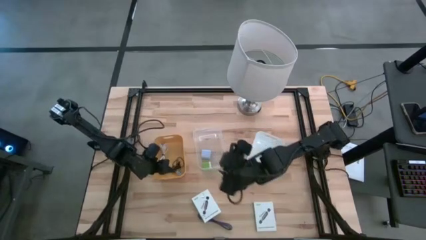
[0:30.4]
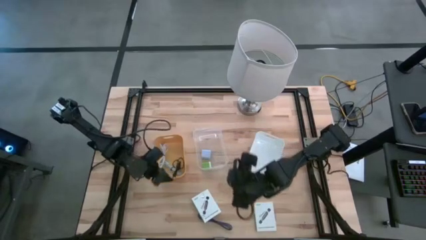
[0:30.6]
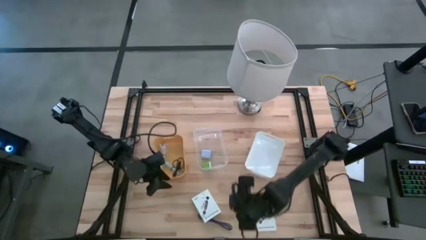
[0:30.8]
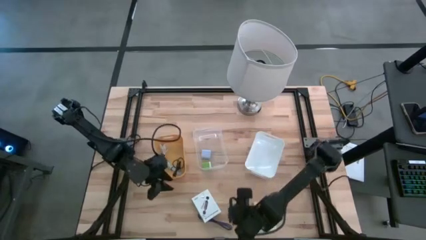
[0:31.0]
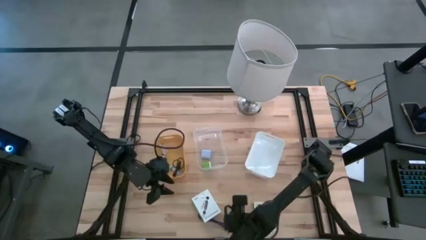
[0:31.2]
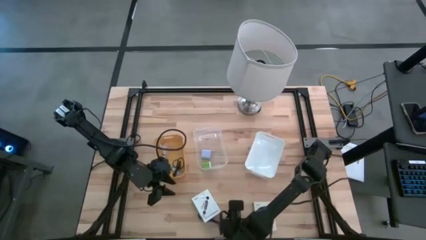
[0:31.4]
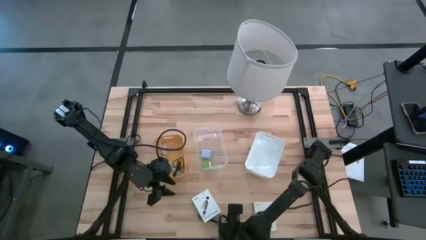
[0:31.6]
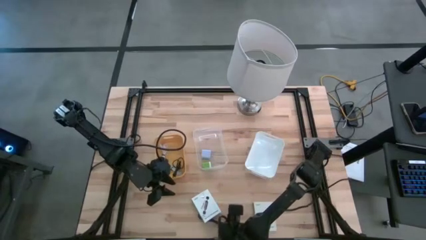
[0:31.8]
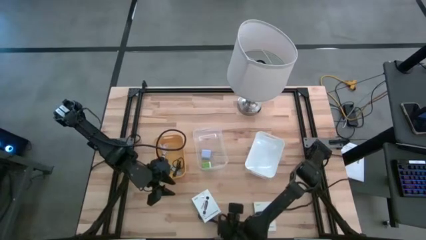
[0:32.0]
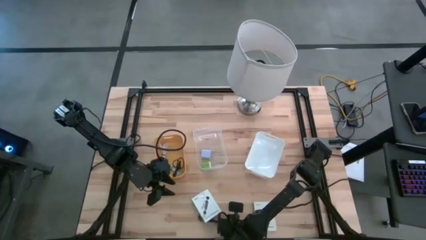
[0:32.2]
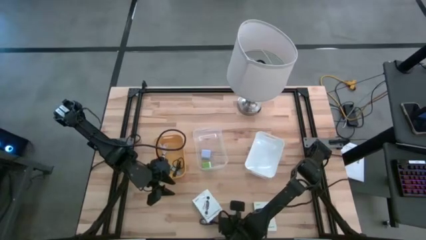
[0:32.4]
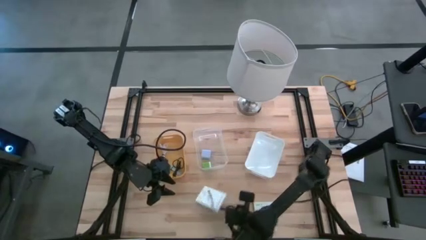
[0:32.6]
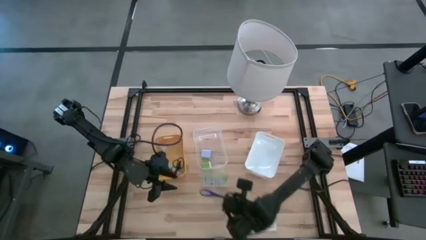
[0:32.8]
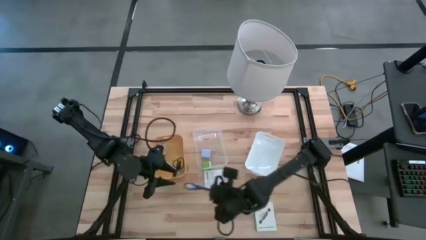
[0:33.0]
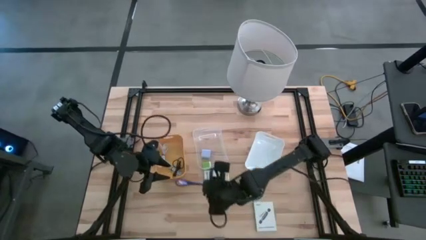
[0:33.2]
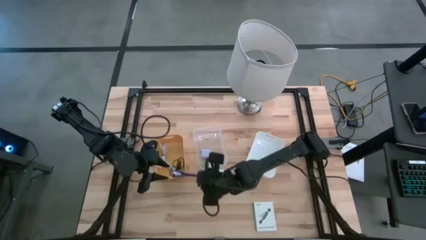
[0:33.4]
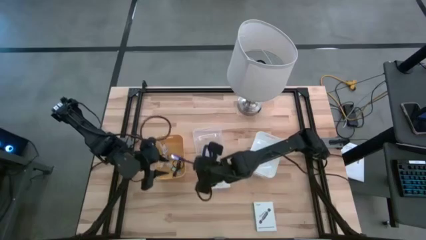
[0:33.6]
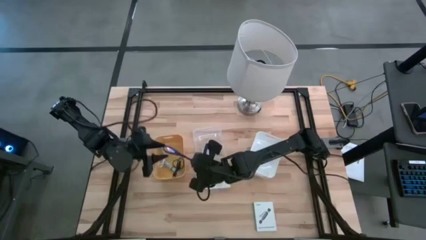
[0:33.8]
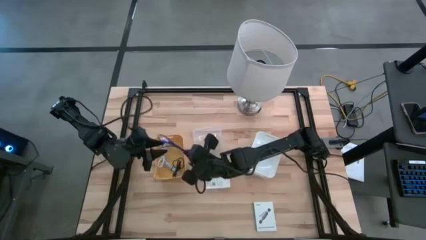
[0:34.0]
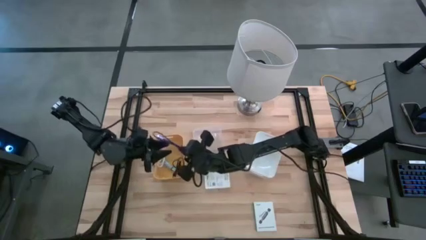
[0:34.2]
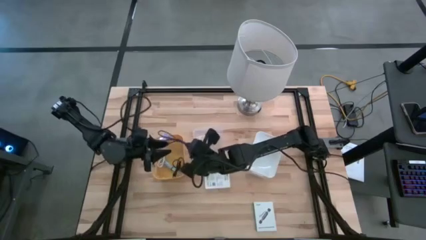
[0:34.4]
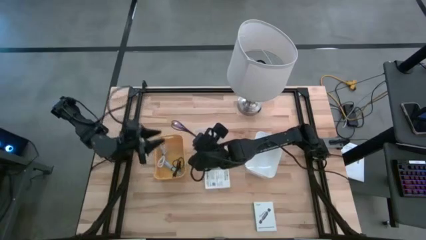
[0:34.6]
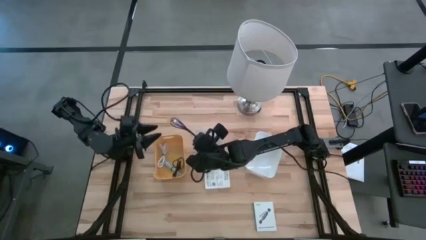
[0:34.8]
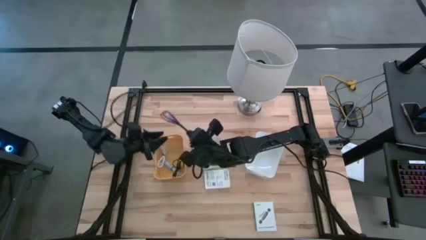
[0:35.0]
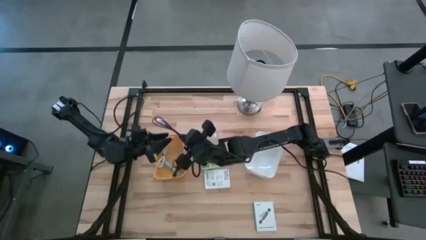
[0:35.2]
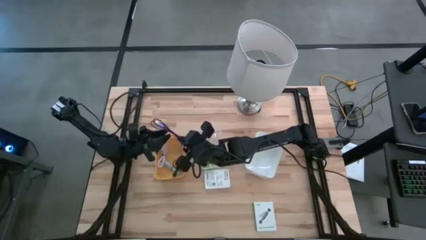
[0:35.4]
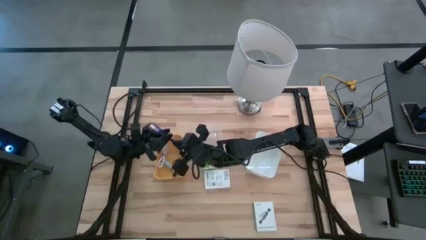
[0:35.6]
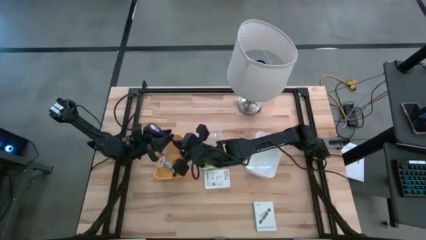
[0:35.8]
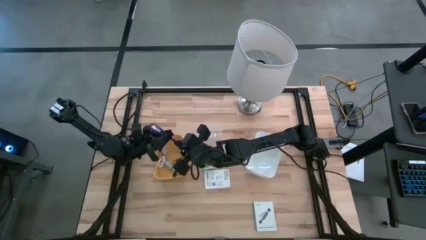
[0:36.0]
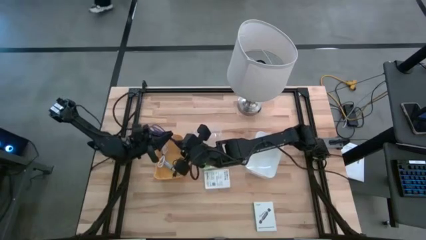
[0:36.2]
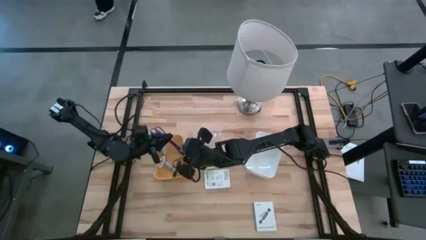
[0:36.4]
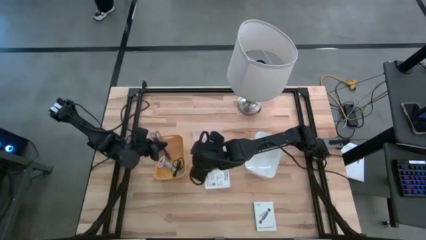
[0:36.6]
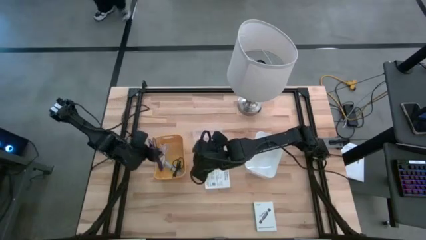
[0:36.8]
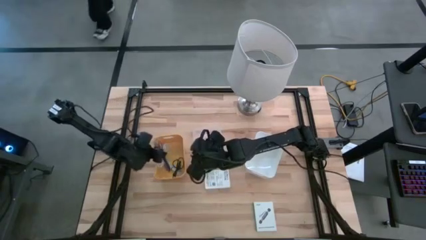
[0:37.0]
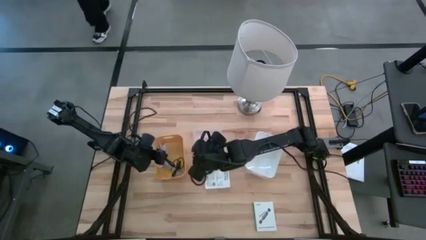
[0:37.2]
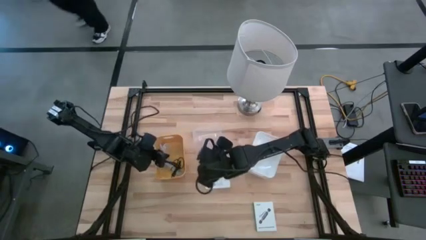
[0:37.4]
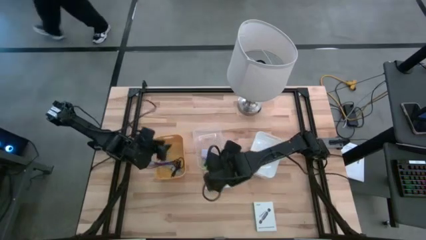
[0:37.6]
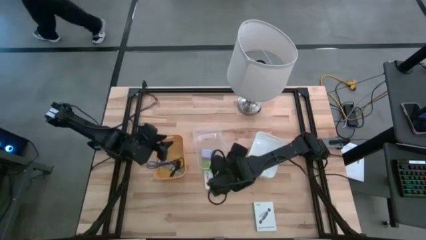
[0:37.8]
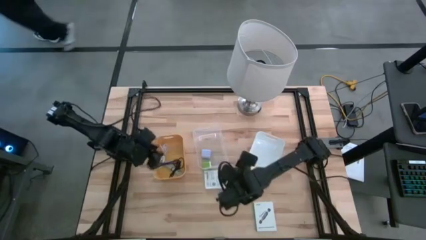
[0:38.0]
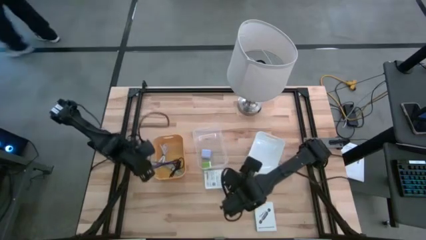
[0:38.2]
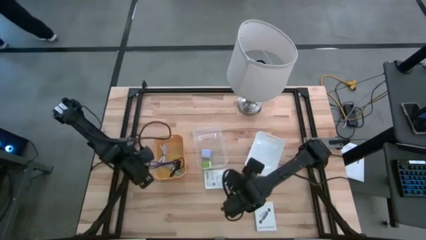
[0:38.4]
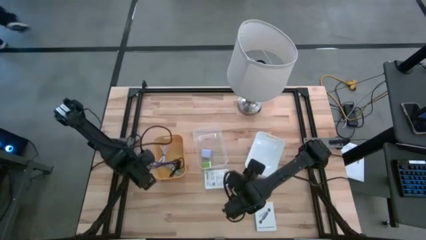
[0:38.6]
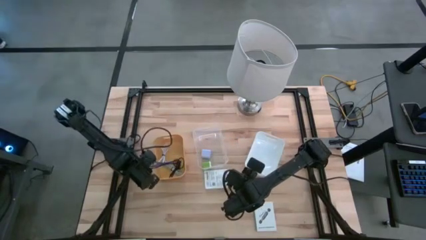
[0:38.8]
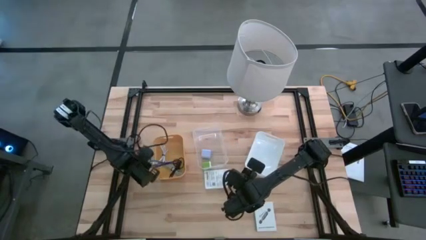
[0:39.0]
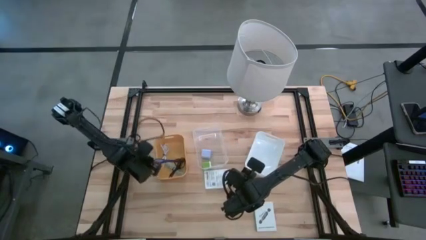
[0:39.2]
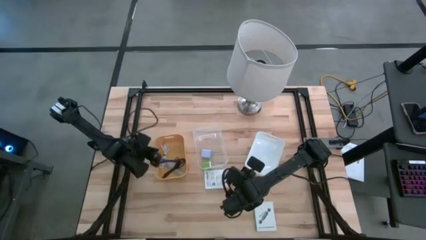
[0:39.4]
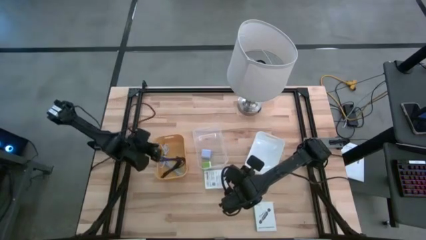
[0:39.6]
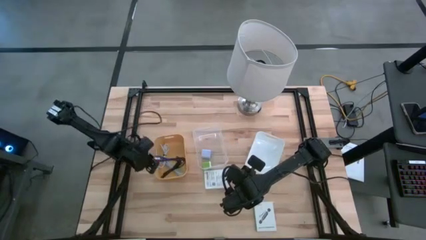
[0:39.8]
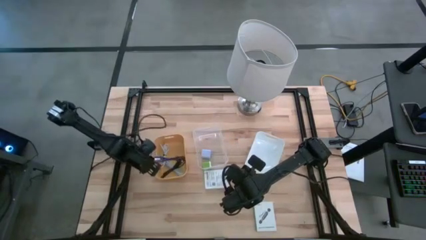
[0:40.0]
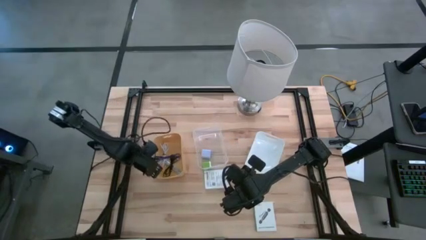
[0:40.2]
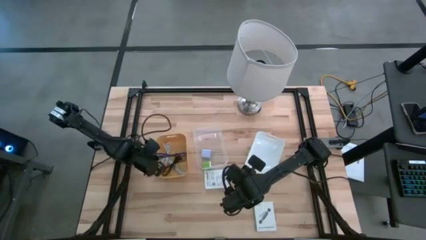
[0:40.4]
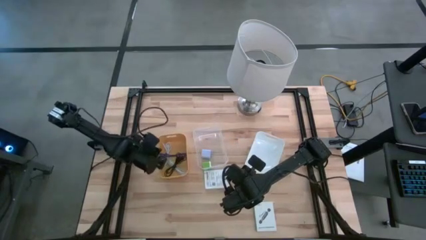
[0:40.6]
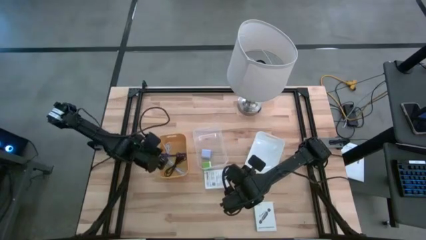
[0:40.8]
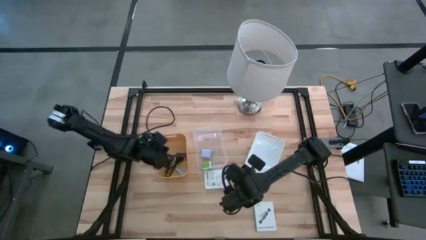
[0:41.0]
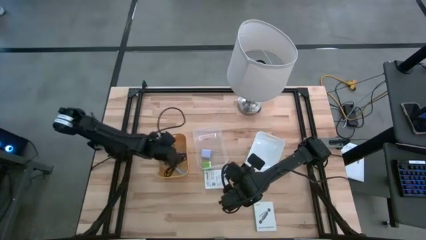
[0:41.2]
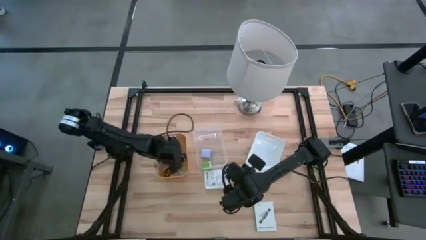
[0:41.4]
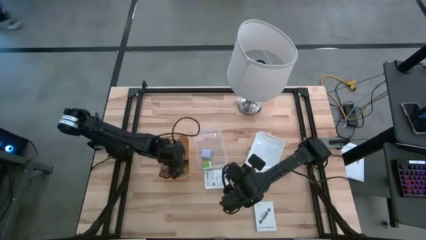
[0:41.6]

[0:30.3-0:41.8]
Task: Pick and place items into bin
Put the violet charger cable into the yellow bin

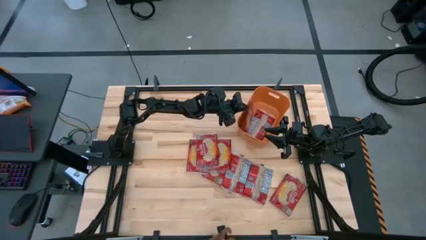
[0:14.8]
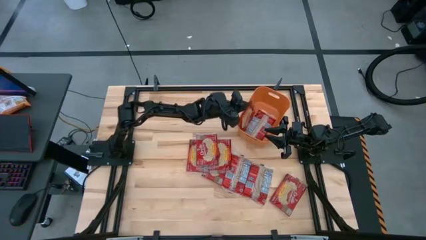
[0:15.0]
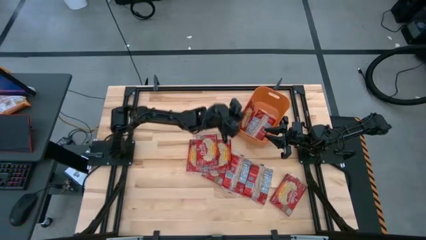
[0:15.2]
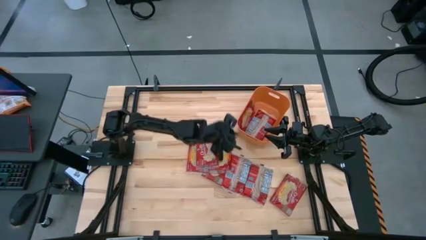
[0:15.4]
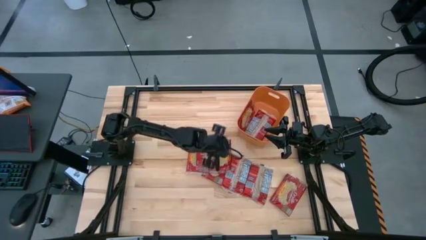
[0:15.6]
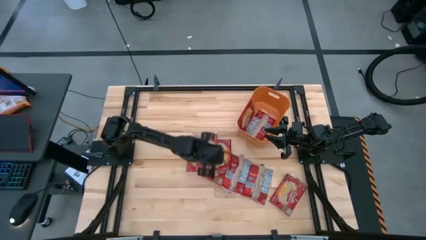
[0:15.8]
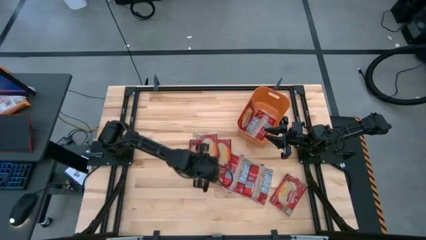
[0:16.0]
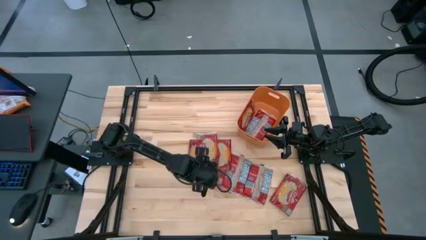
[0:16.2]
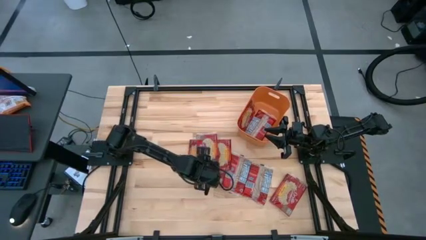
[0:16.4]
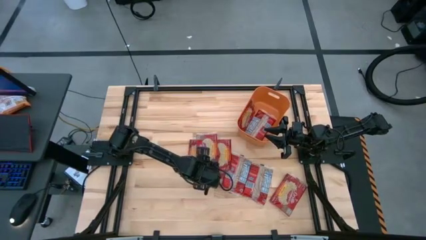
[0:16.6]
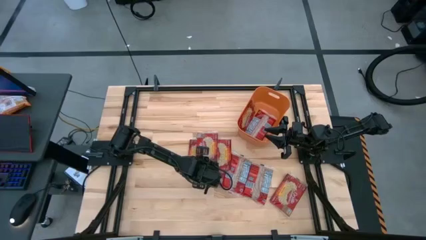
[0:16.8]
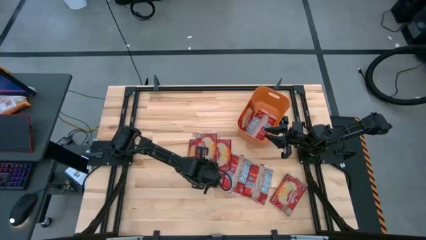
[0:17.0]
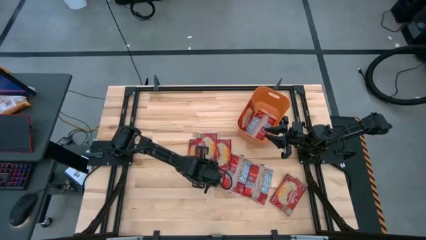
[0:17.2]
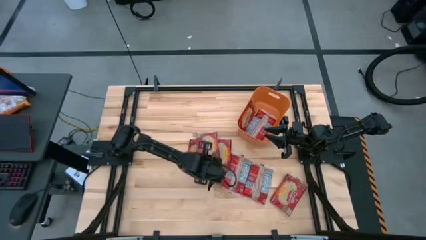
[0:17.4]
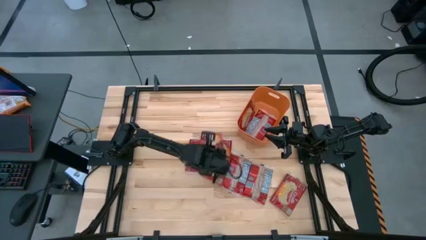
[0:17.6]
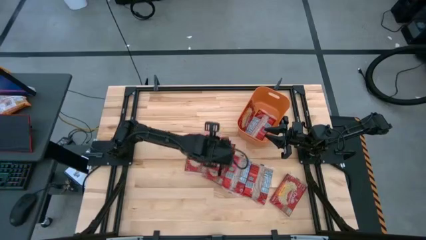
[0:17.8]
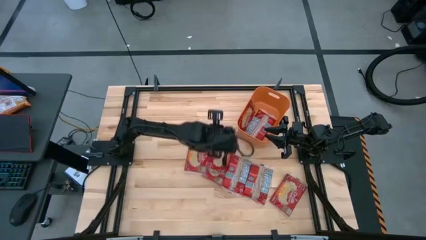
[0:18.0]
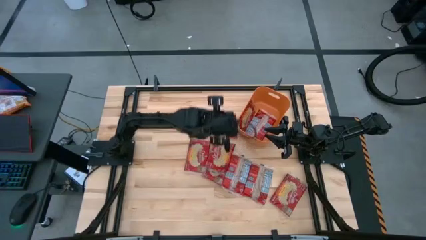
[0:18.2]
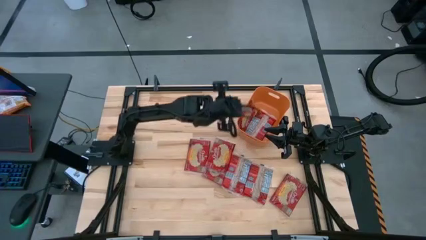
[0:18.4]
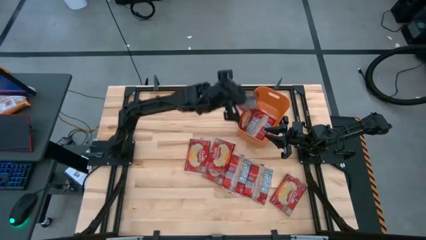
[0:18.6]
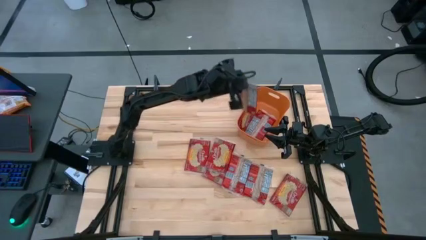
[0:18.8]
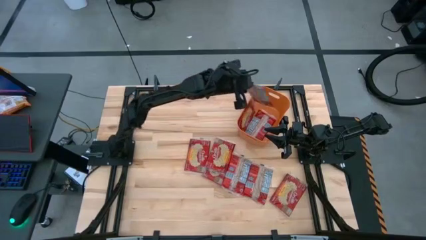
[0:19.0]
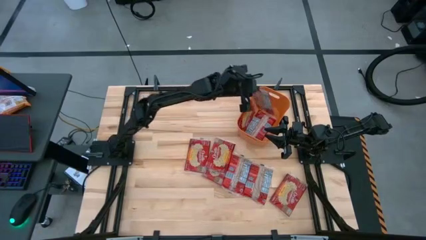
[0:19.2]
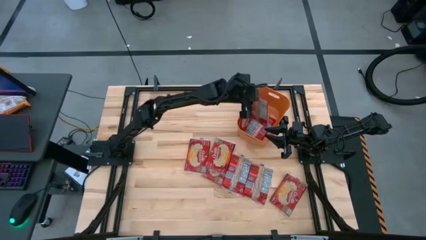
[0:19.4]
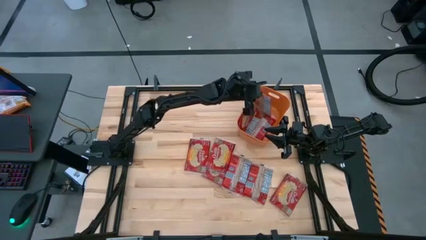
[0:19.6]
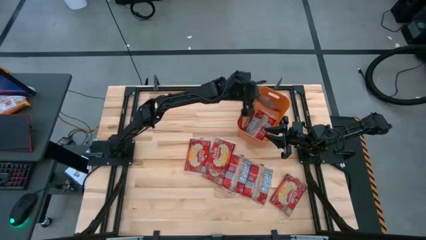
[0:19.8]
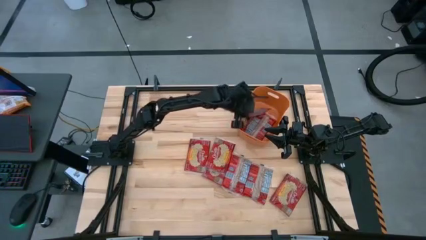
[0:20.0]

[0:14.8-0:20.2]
Task: Sort popcorn bags into baskets
Put the red popcorn bag into the orange bin
